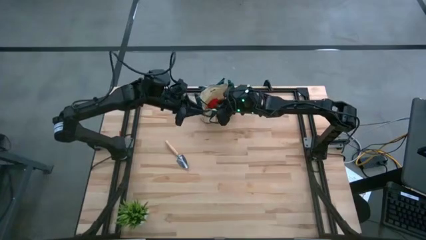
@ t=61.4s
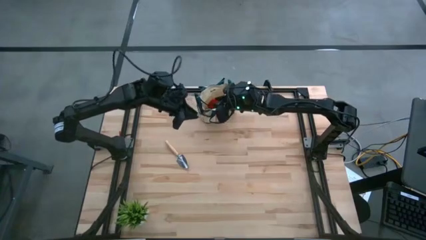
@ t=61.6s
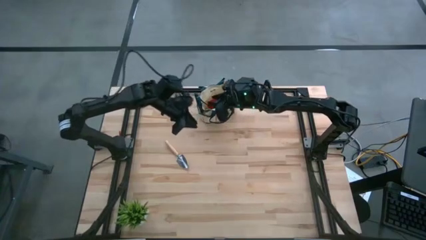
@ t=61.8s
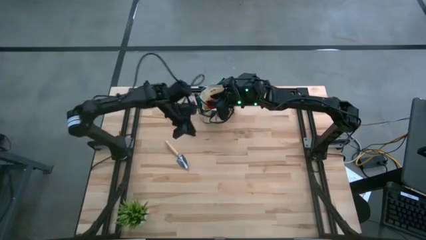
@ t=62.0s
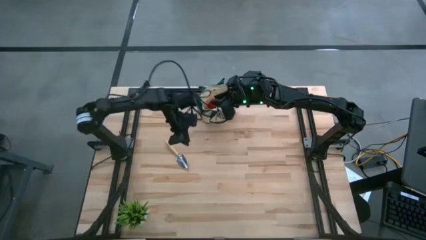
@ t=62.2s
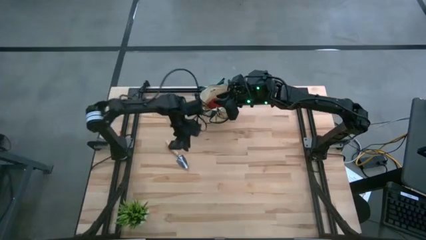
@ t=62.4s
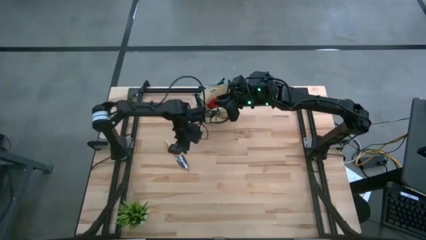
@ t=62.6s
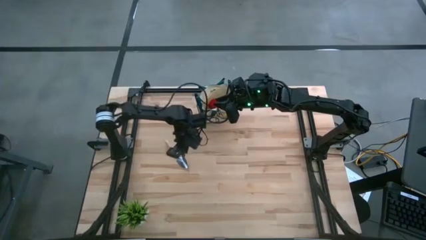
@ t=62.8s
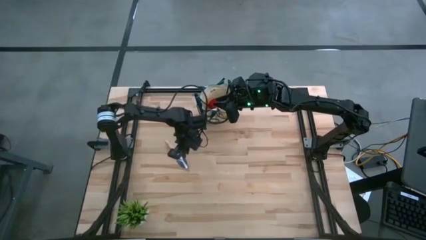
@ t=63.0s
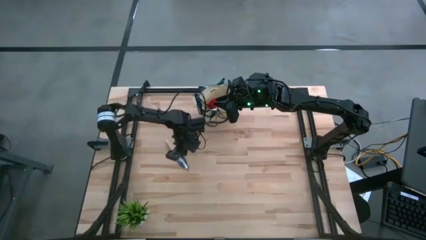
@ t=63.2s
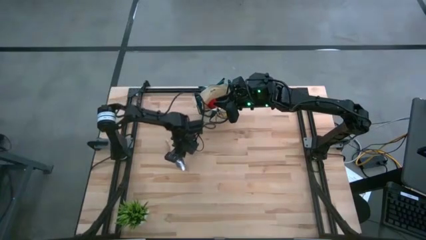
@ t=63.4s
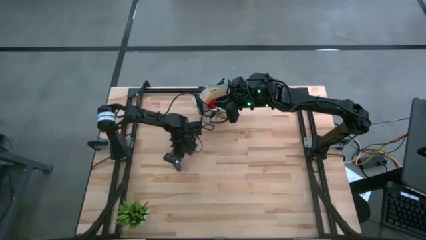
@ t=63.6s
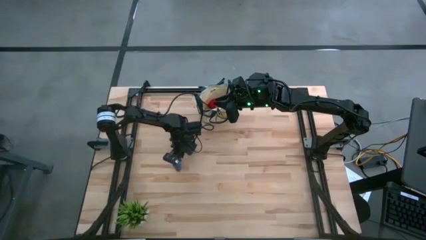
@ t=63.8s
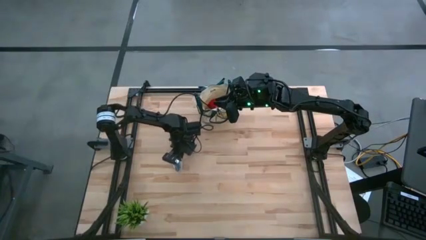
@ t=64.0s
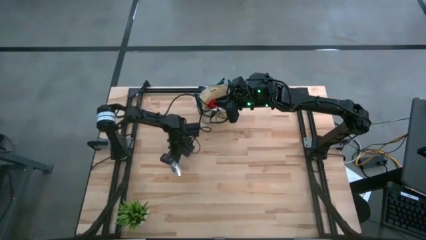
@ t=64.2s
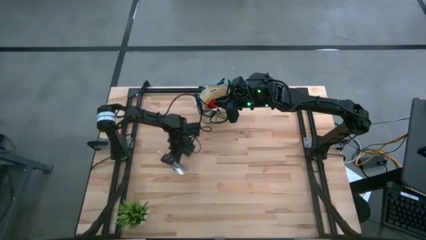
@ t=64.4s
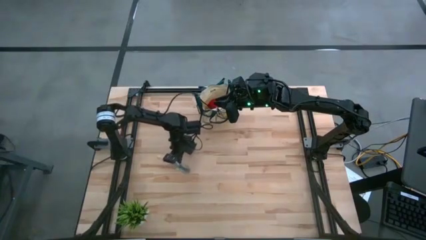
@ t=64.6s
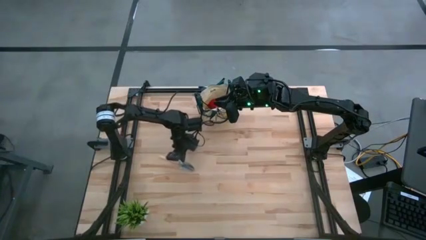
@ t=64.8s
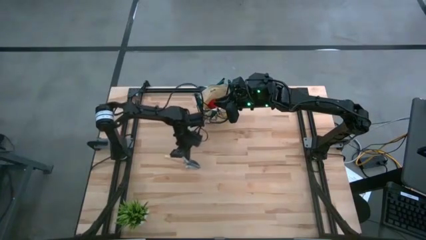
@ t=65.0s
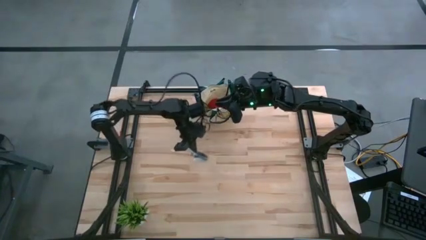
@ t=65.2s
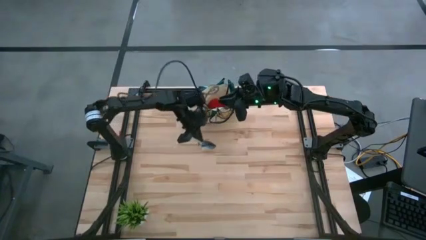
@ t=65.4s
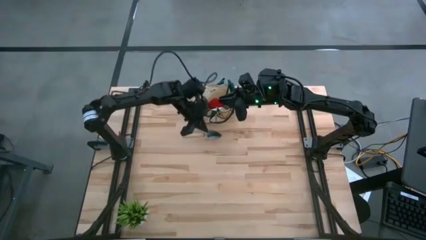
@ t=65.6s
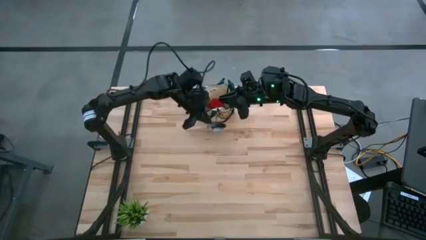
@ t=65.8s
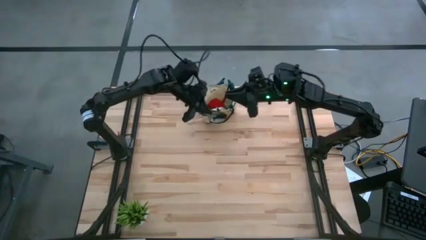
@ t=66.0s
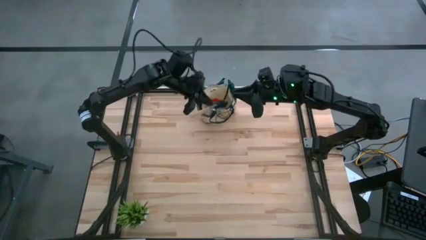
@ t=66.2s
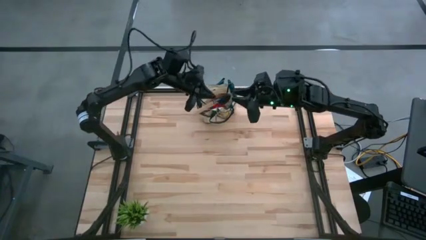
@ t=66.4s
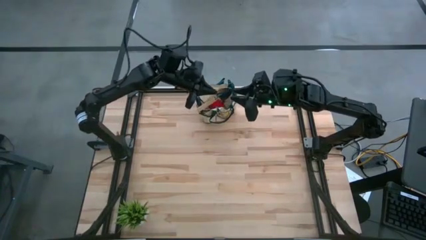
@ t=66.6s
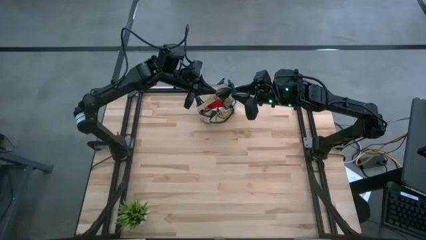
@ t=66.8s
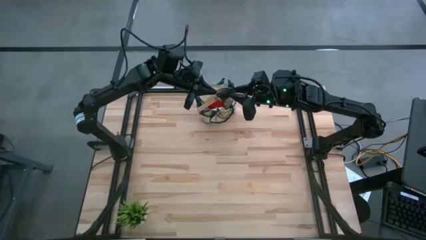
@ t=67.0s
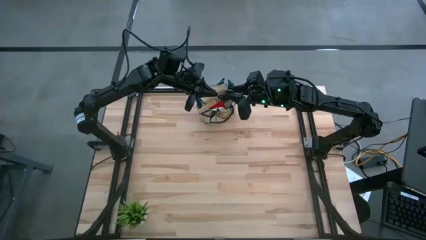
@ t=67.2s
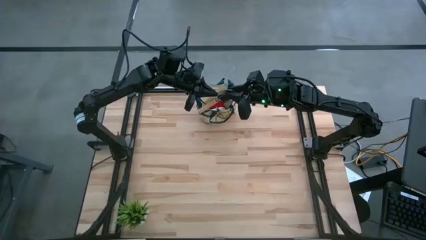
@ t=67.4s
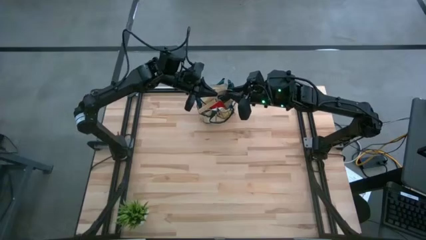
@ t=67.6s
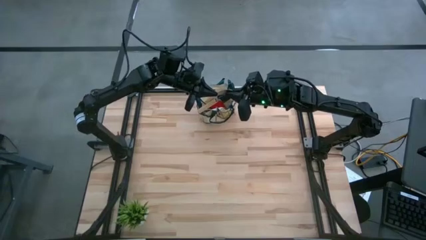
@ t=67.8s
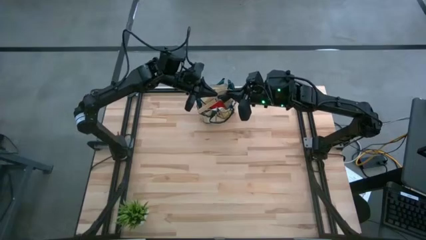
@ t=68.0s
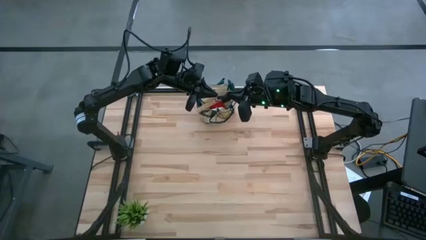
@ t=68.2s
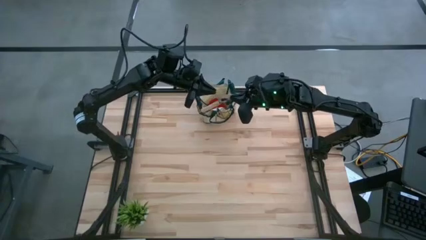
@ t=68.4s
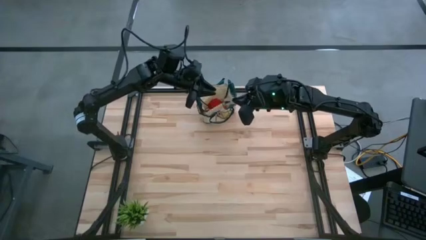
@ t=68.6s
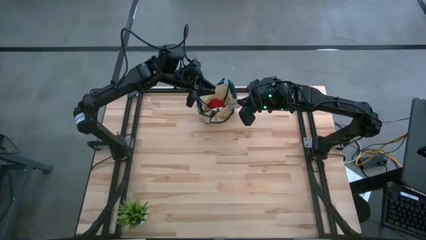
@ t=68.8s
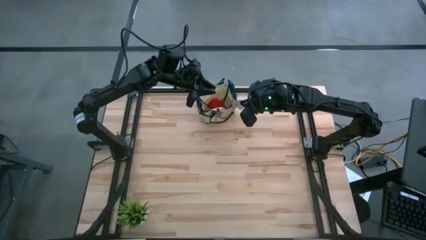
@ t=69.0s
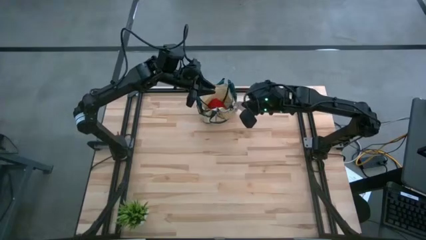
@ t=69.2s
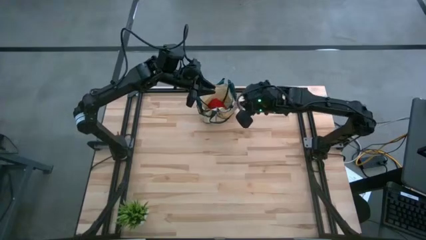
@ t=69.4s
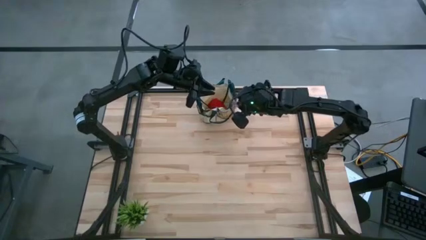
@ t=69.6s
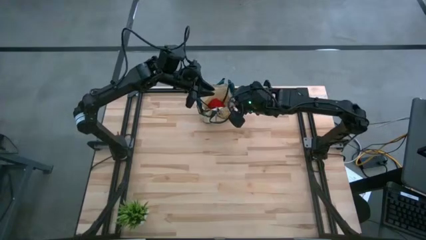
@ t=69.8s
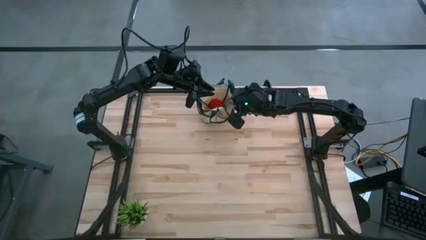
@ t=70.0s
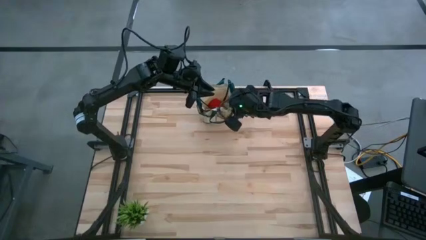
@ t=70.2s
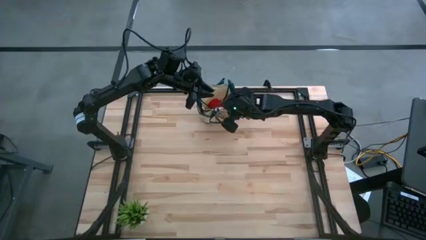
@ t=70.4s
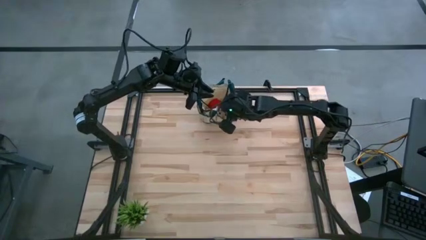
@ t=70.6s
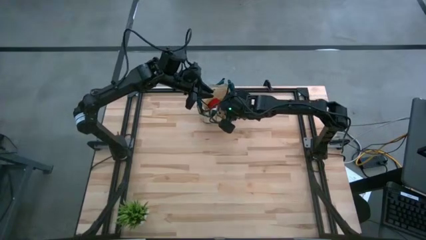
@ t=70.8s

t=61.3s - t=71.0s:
Task: Pick & Place Garden tools in Gardening bag
Put the trowel into the gardening bag

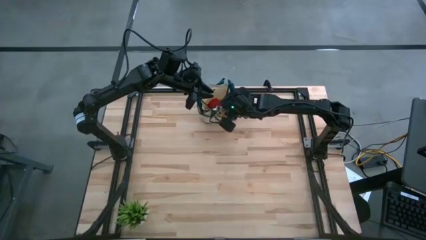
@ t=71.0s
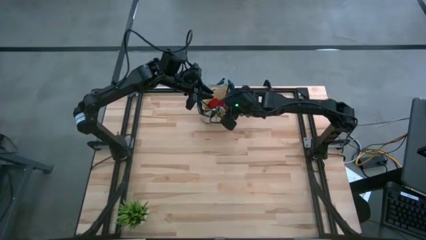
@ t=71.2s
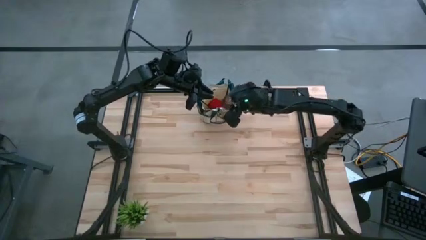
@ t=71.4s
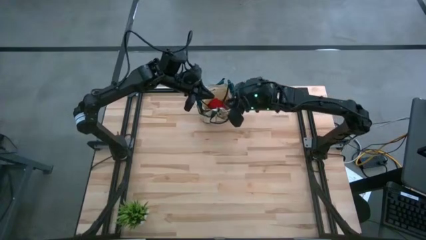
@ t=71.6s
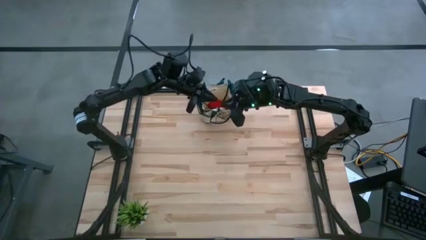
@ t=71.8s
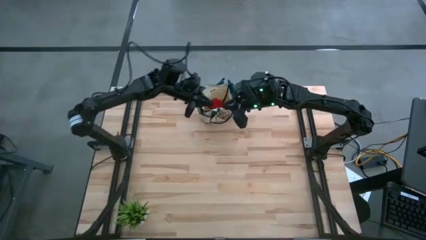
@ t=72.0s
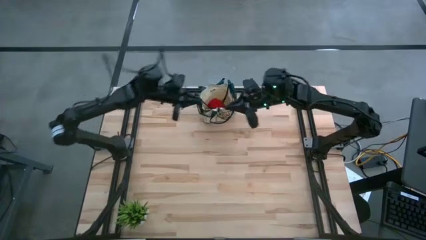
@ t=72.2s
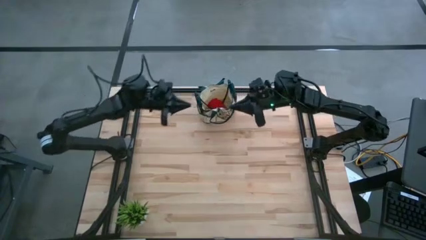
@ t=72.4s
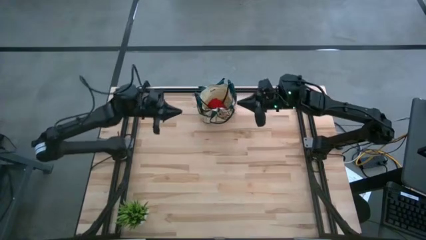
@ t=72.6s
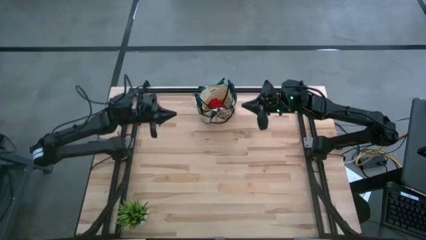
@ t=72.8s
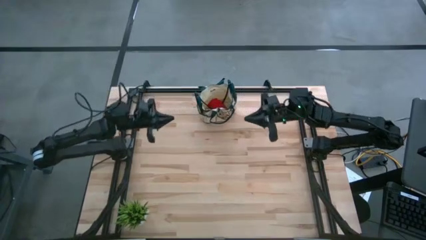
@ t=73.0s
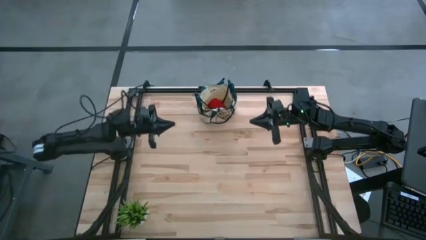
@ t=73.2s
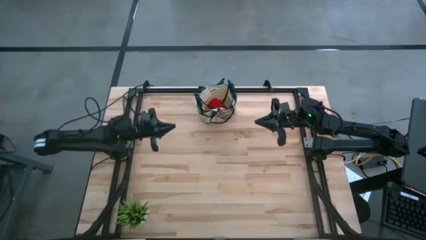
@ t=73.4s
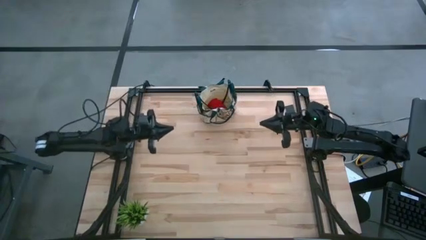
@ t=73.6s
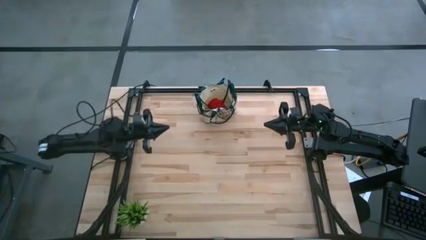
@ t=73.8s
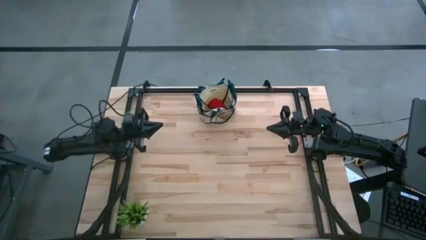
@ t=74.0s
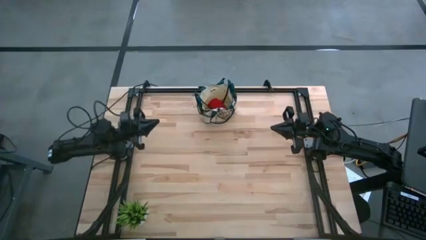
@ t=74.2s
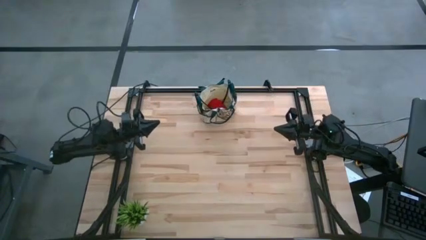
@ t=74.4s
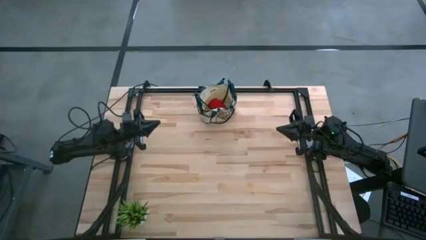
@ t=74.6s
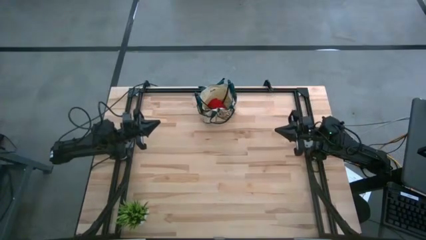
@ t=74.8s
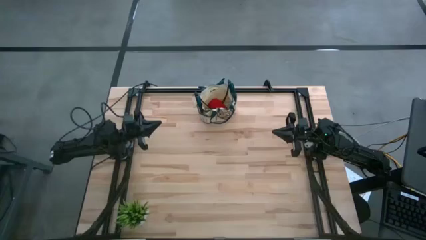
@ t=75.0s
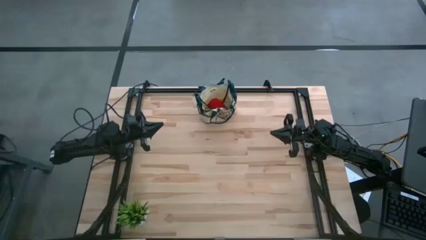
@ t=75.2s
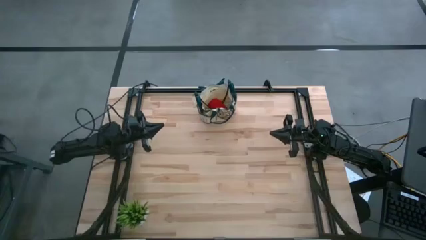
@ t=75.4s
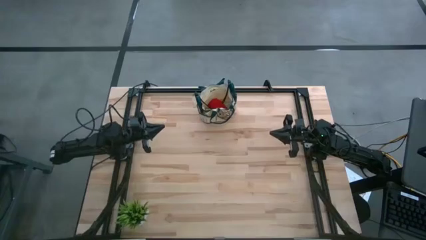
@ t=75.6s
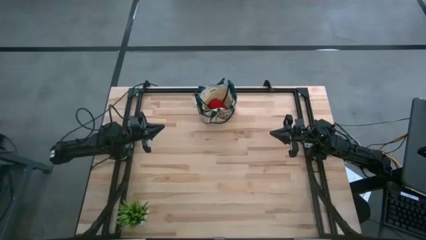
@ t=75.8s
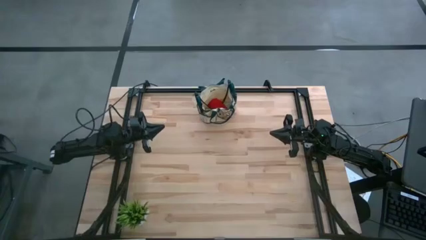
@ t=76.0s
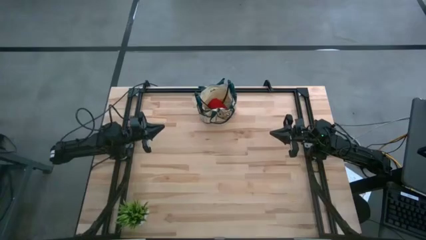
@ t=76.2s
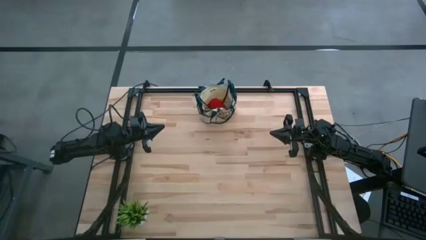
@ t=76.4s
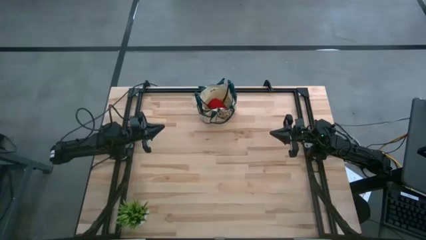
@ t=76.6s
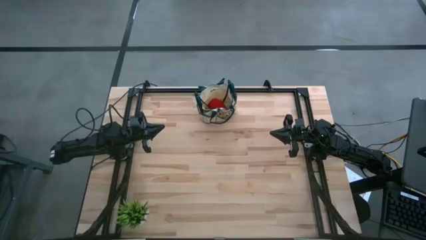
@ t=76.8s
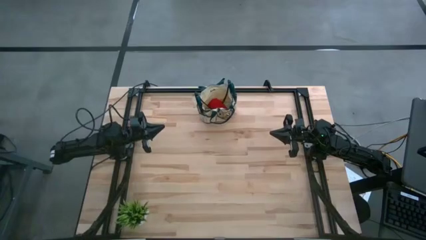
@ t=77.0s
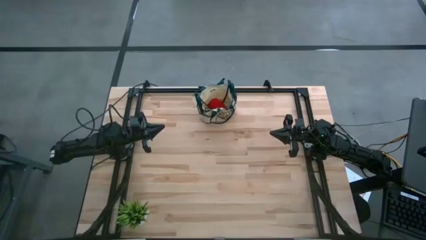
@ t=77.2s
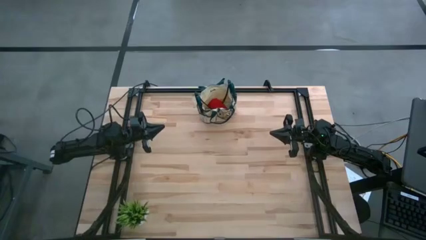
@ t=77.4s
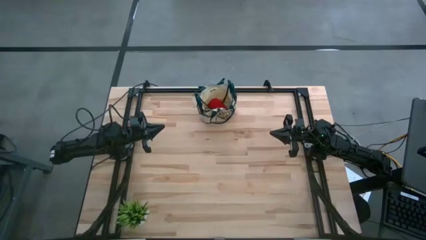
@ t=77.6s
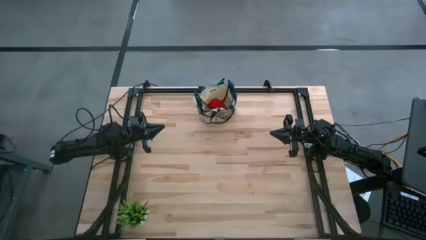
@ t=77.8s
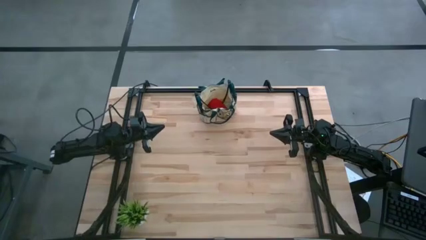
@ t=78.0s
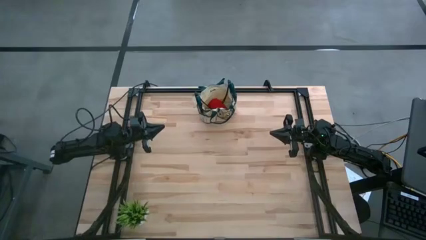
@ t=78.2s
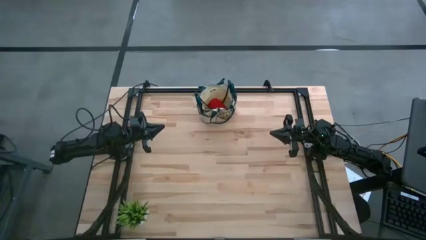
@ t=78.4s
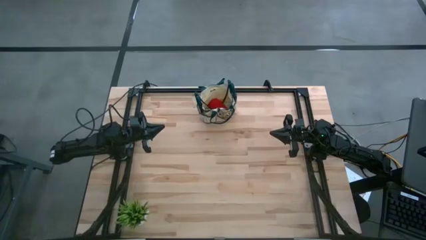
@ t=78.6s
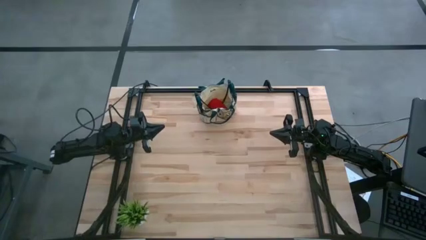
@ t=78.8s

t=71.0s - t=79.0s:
Return to Home Position
